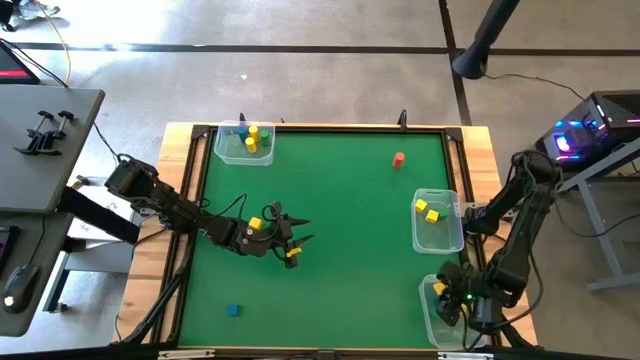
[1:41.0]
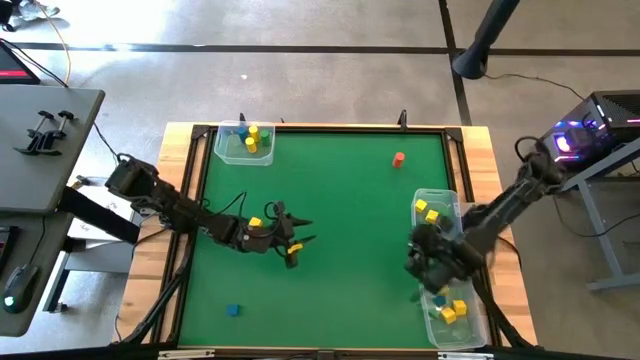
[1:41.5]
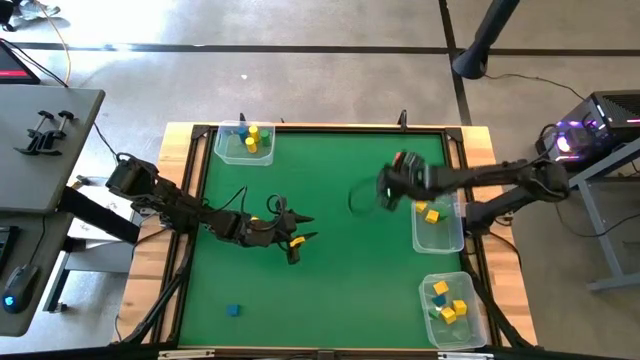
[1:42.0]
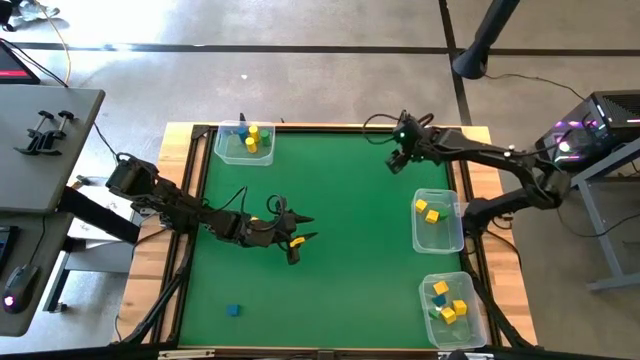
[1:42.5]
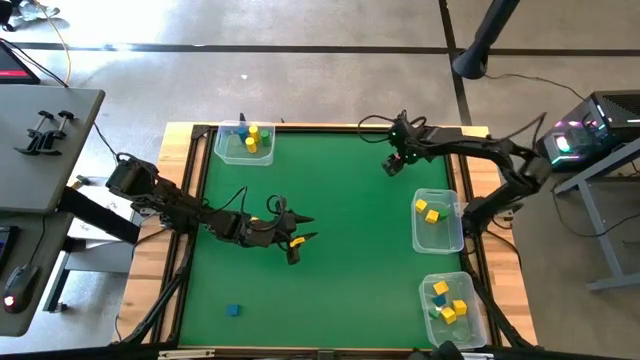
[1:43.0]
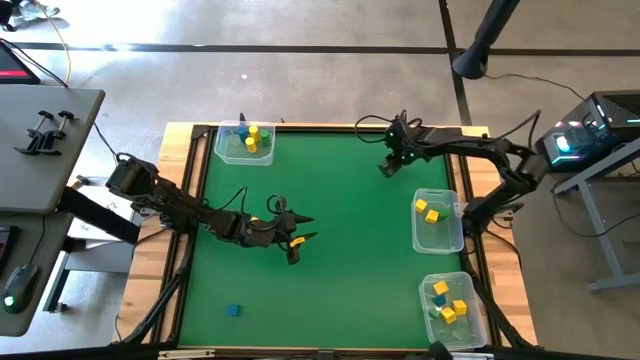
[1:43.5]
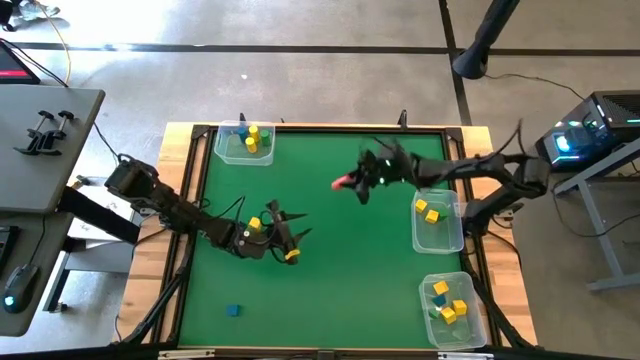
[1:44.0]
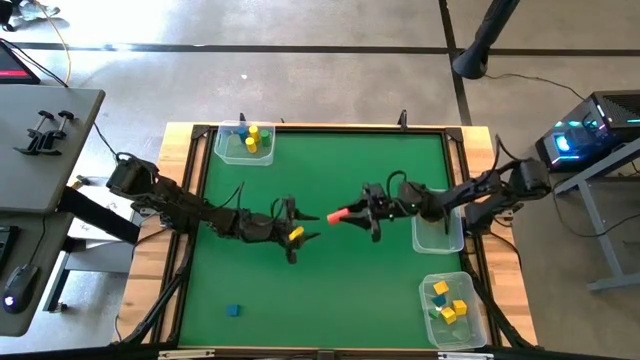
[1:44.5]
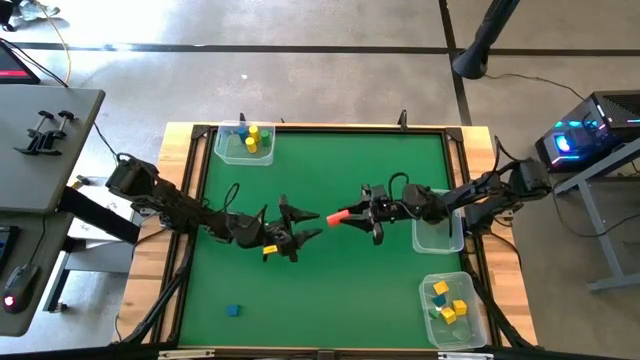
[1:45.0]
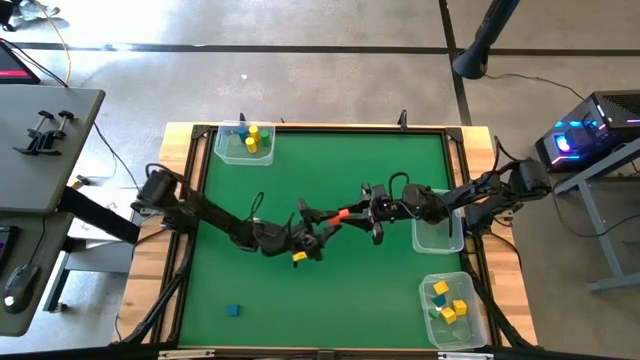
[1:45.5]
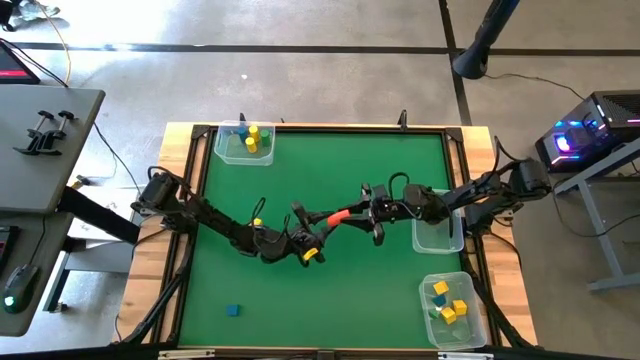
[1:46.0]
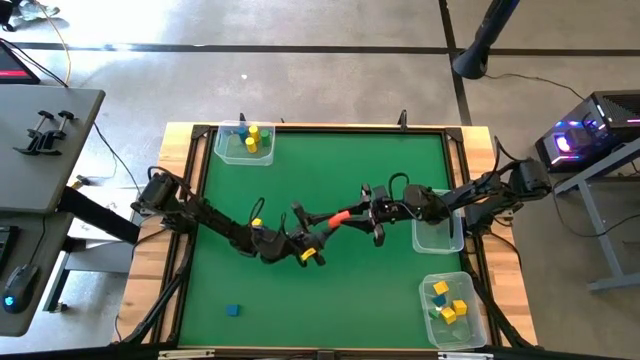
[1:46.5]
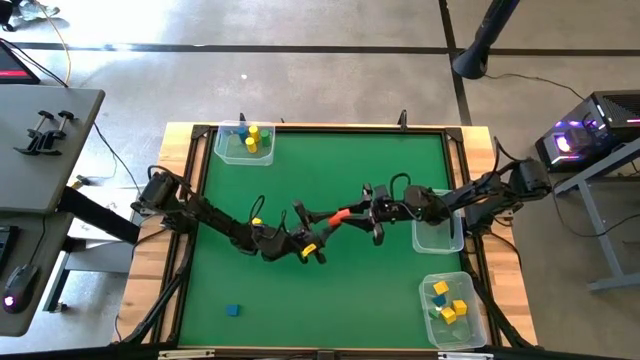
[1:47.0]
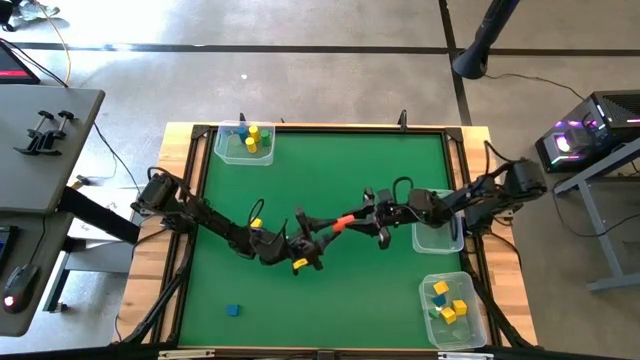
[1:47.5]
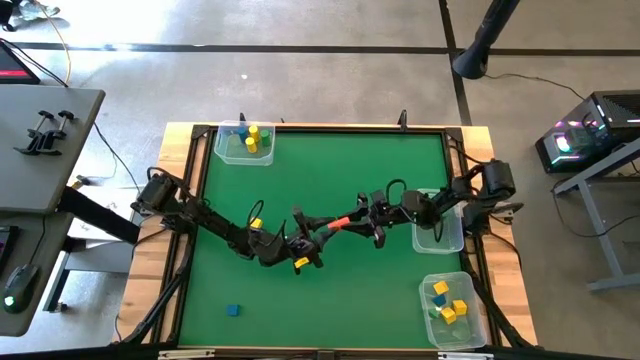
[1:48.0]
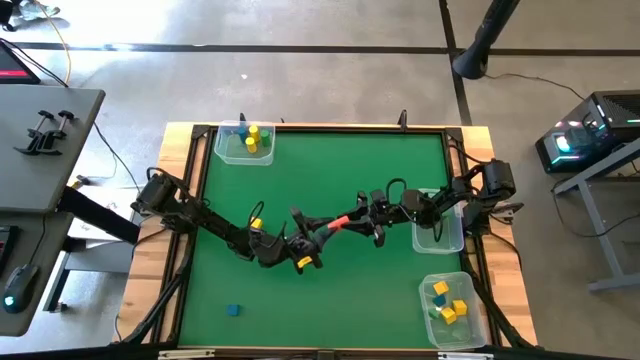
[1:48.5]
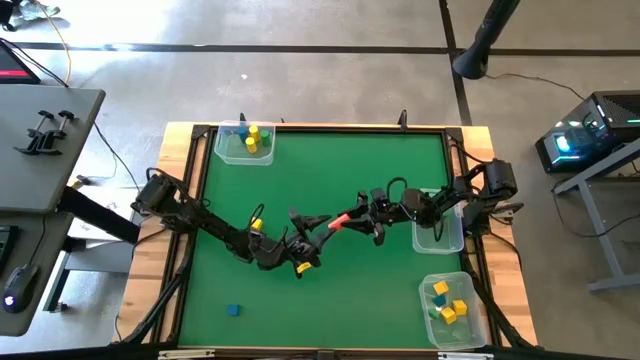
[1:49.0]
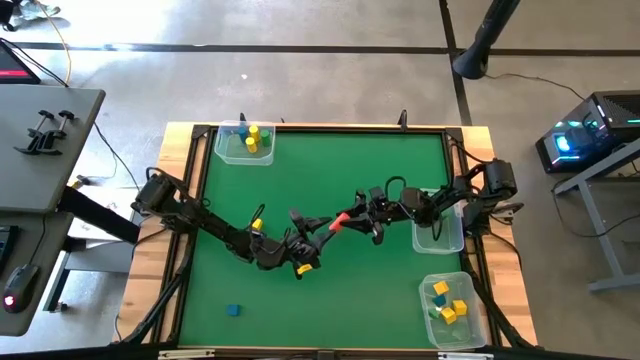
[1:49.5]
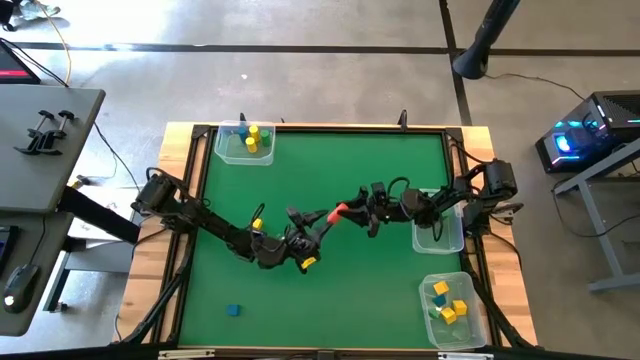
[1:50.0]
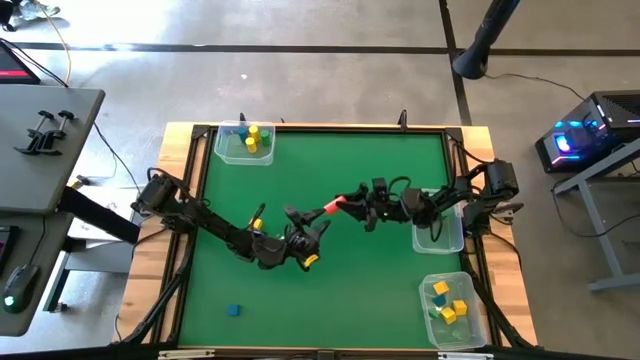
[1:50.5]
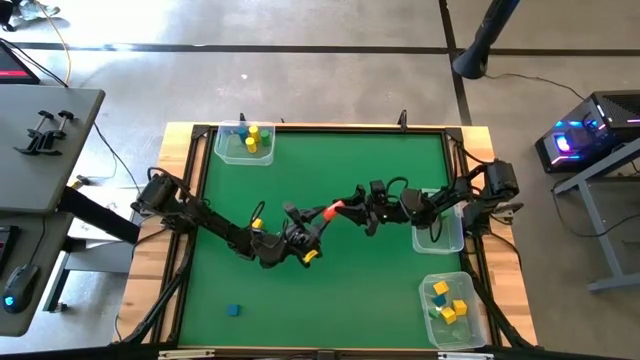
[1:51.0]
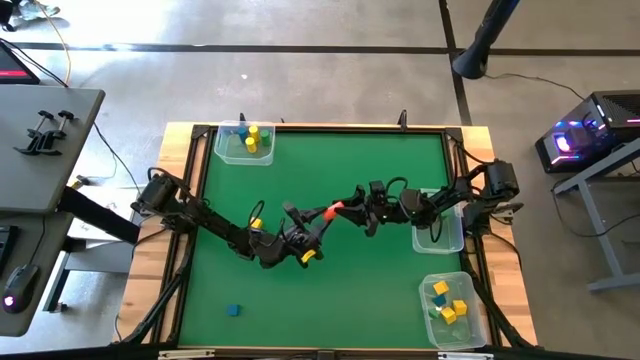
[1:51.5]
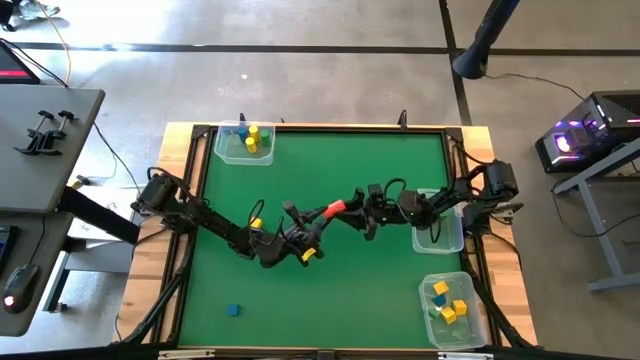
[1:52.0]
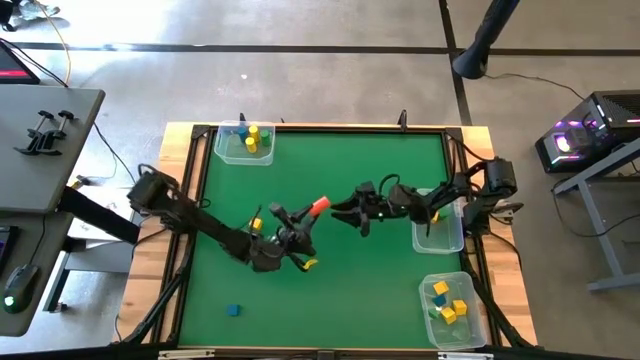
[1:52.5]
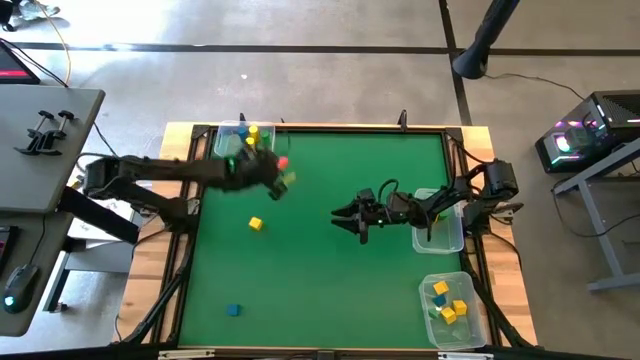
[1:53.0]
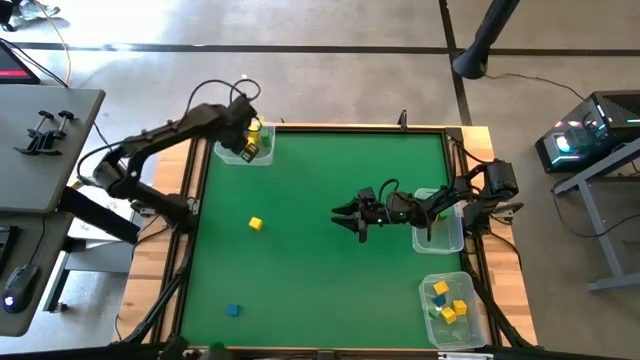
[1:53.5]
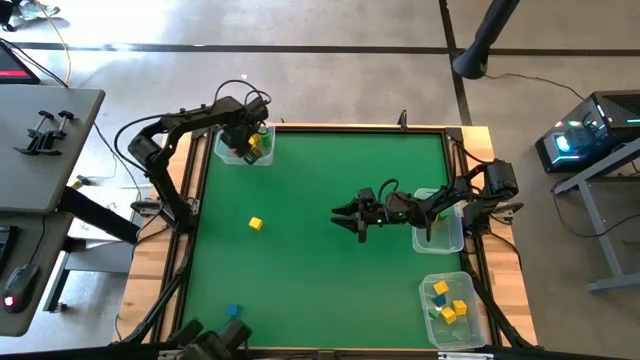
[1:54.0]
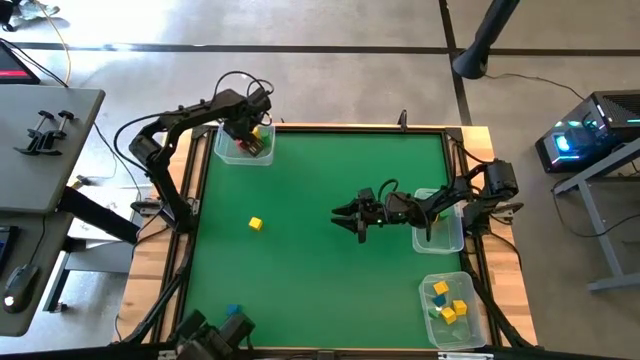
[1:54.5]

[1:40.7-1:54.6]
Task: Sort blocks by size
Put the red cylindrical block into the top transparent bin

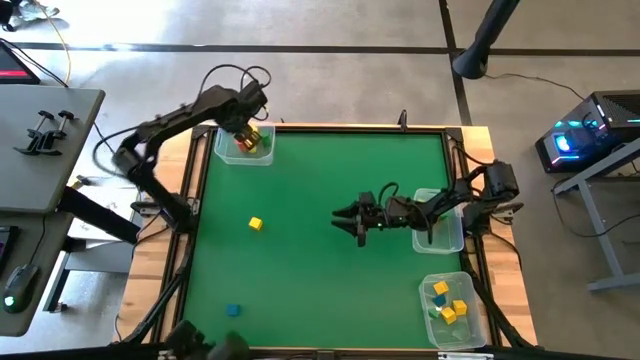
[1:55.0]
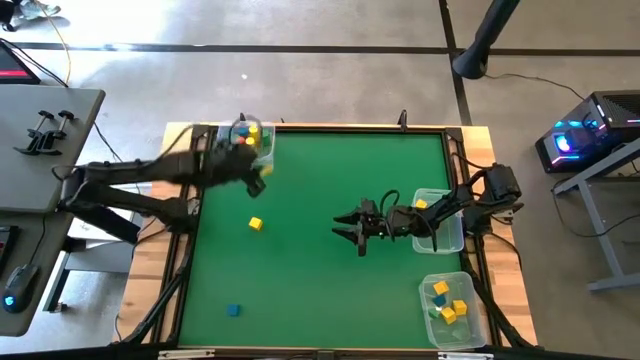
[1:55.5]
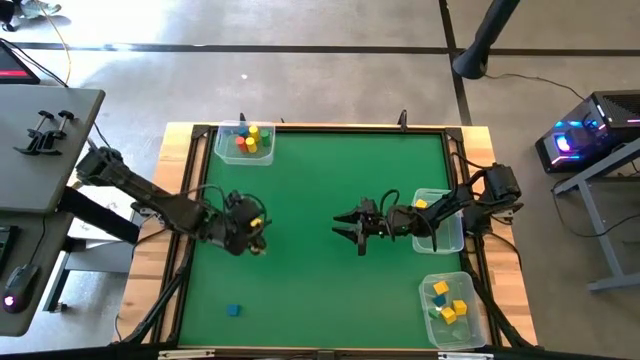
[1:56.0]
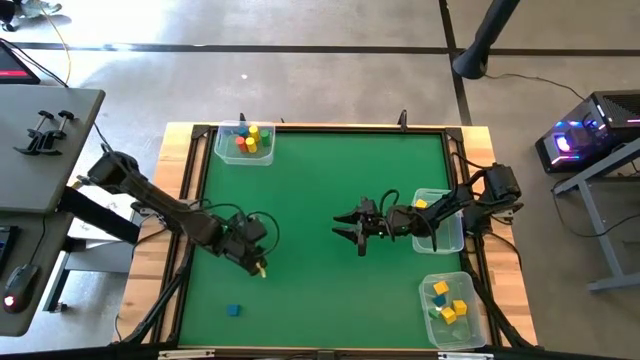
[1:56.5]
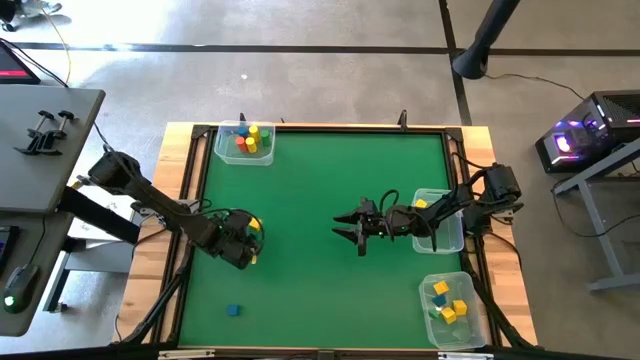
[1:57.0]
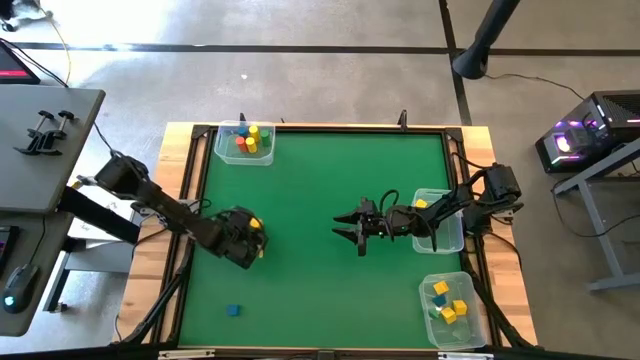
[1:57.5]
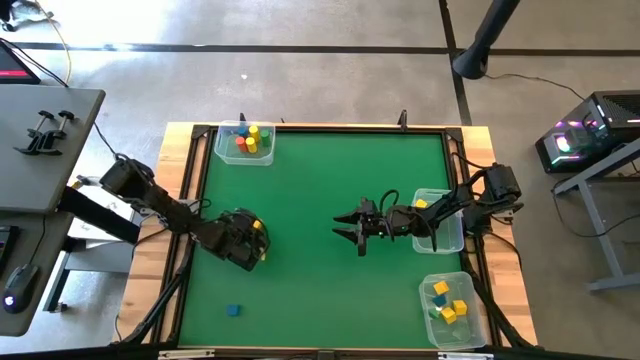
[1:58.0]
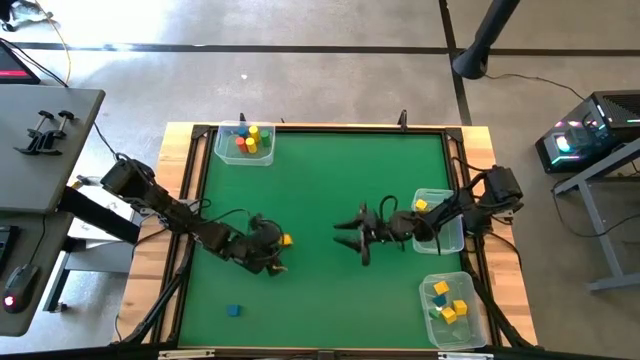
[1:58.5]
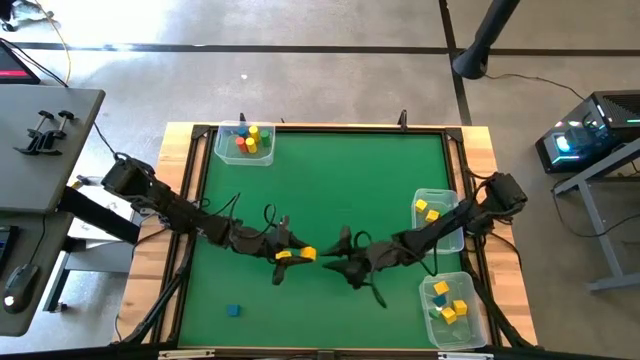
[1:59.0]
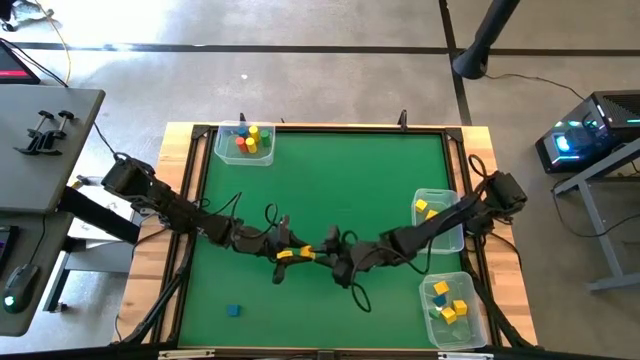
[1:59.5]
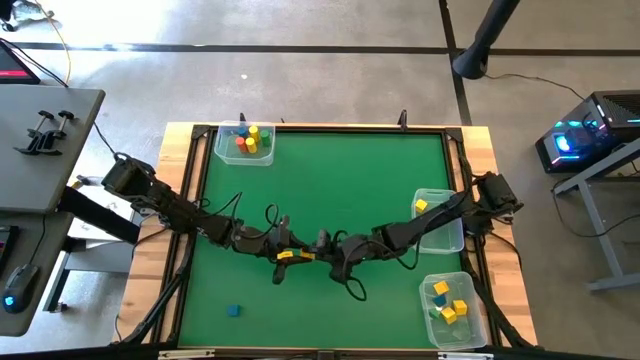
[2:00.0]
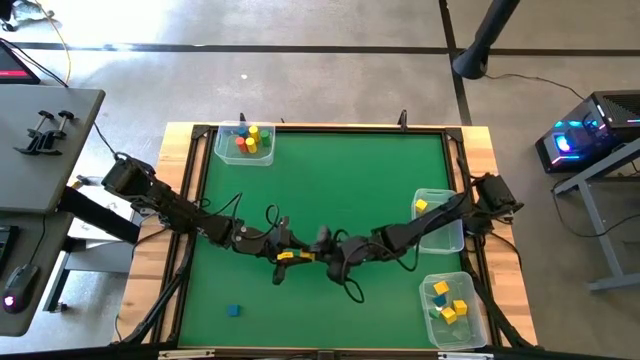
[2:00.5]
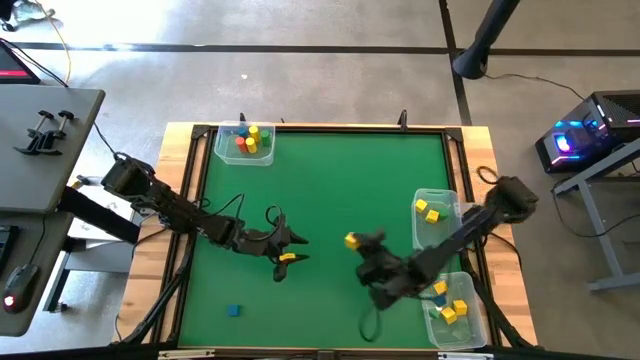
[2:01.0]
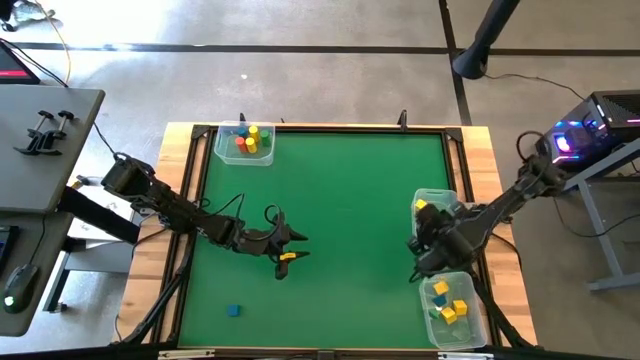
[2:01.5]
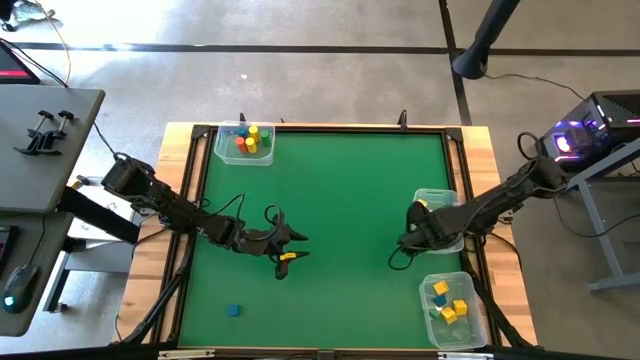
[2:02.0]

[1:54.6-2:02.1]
Put the yellow cube block into the middle transparent bin
